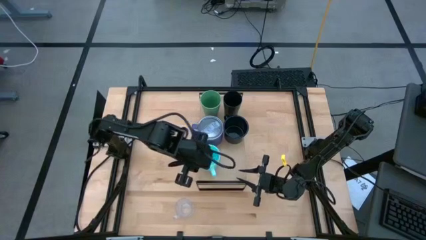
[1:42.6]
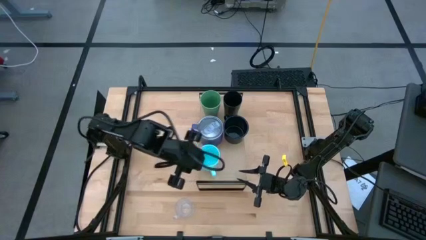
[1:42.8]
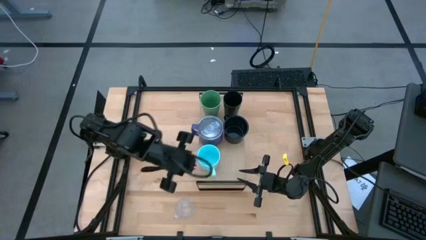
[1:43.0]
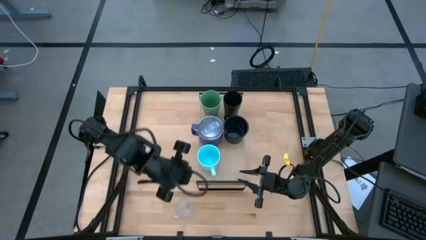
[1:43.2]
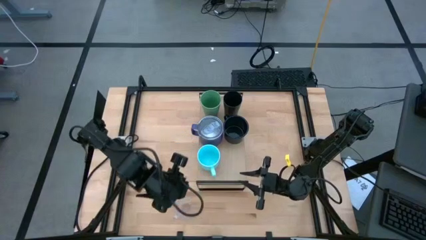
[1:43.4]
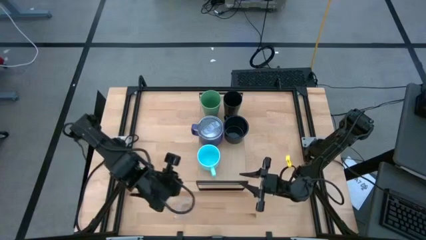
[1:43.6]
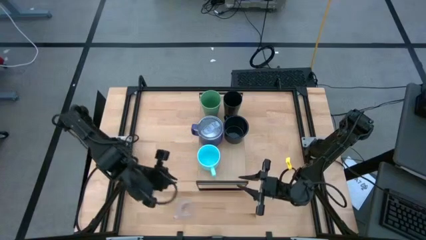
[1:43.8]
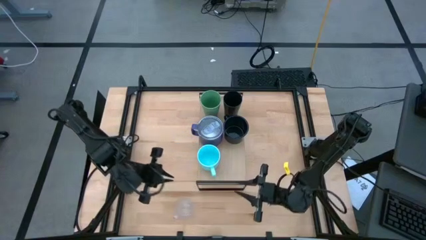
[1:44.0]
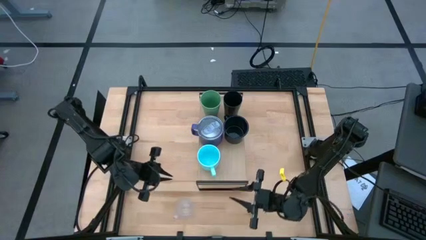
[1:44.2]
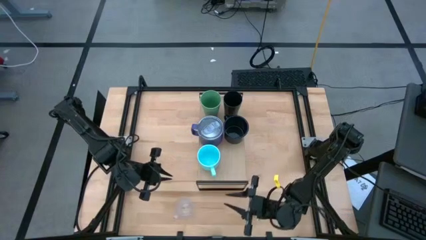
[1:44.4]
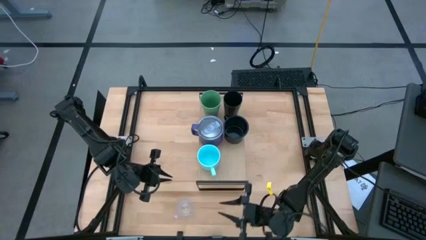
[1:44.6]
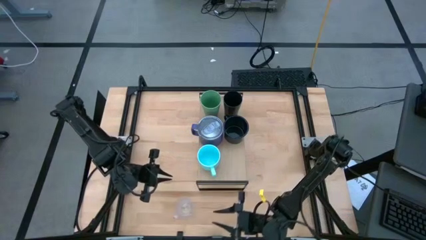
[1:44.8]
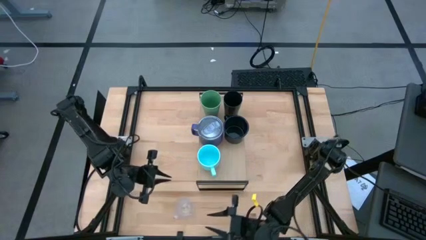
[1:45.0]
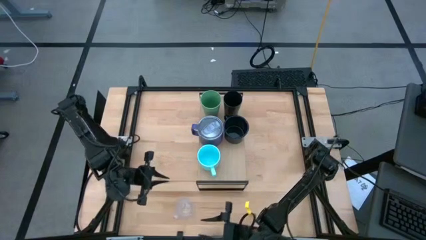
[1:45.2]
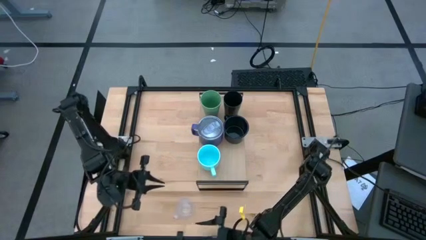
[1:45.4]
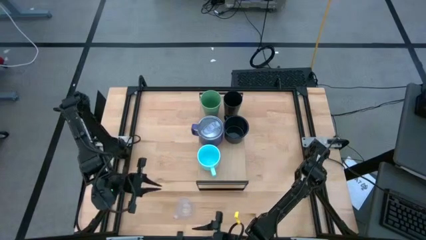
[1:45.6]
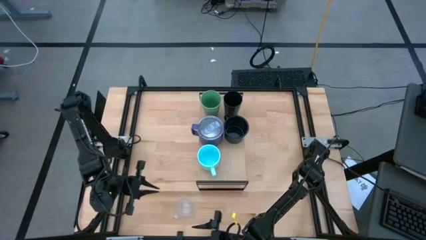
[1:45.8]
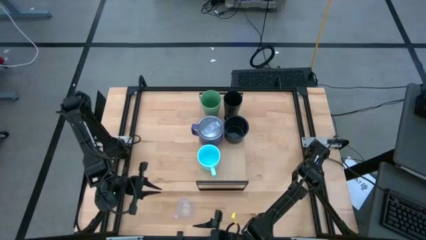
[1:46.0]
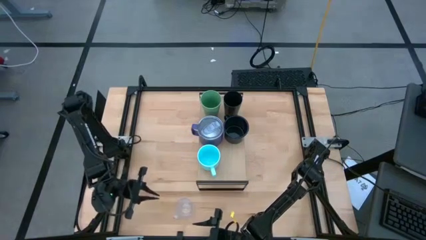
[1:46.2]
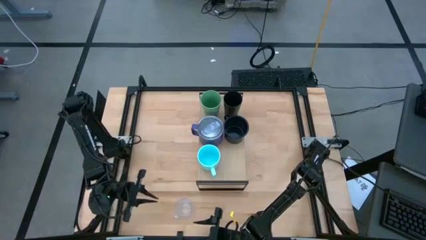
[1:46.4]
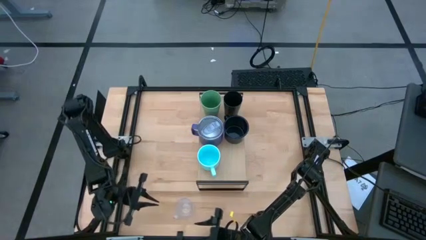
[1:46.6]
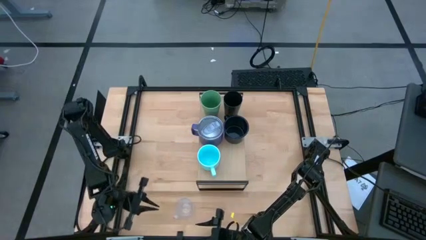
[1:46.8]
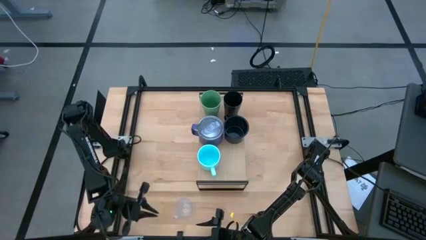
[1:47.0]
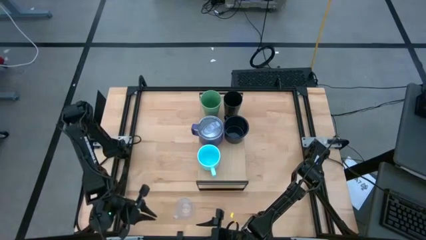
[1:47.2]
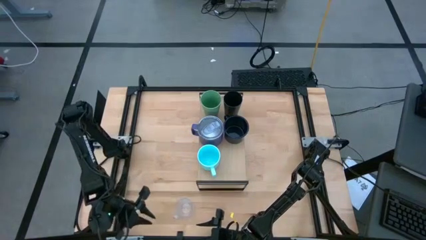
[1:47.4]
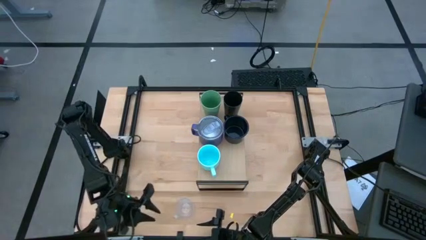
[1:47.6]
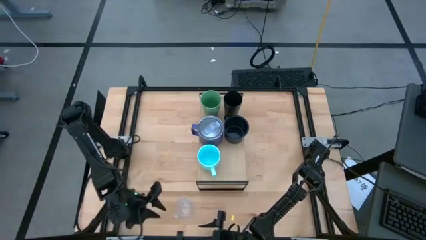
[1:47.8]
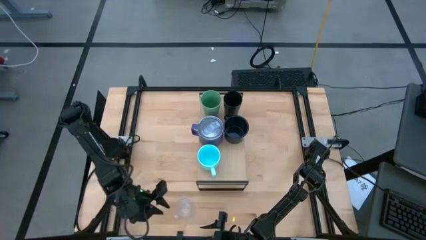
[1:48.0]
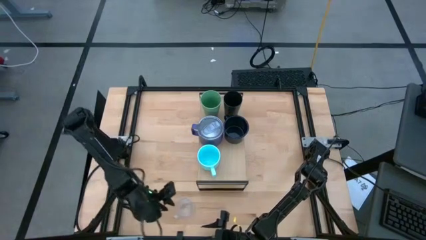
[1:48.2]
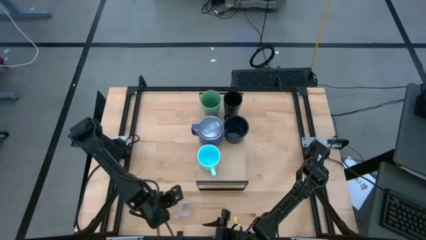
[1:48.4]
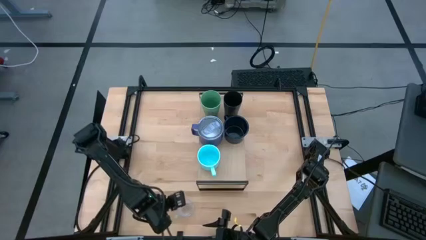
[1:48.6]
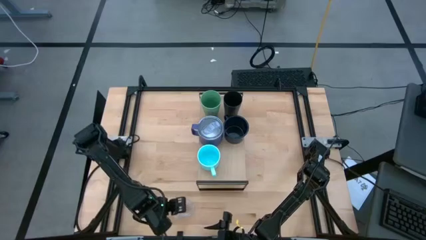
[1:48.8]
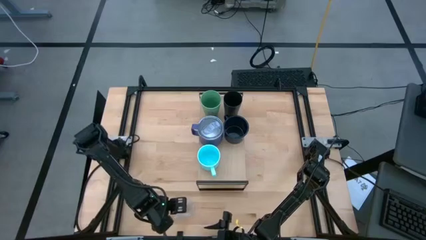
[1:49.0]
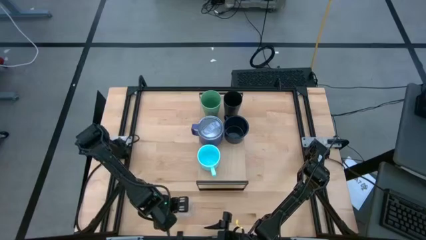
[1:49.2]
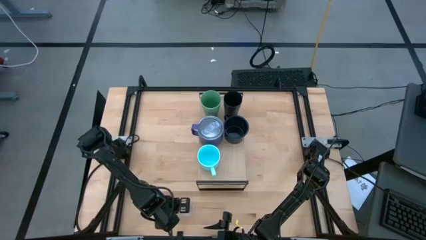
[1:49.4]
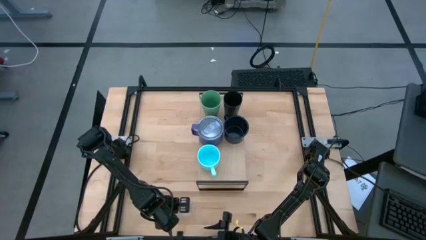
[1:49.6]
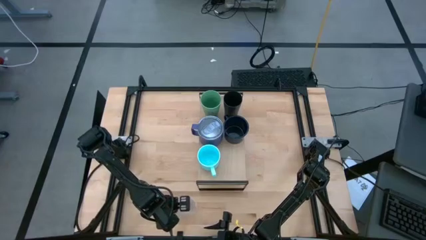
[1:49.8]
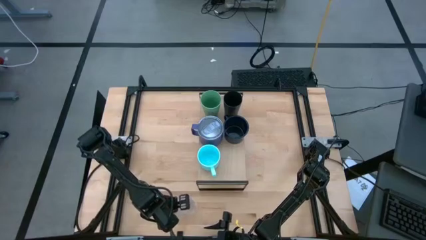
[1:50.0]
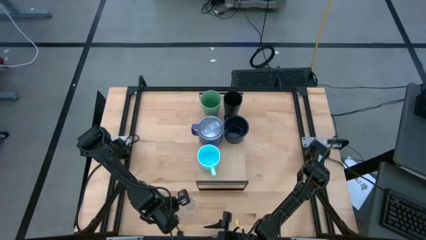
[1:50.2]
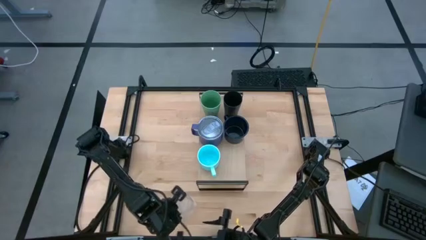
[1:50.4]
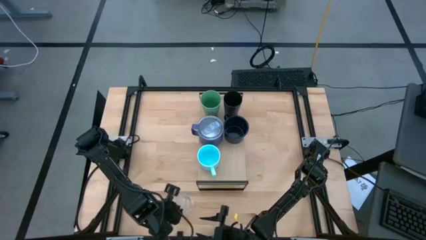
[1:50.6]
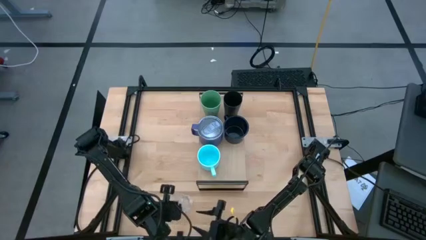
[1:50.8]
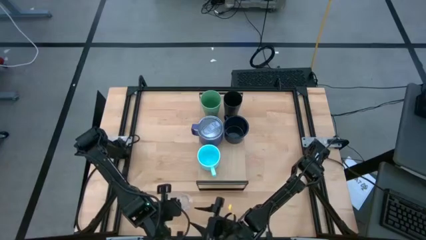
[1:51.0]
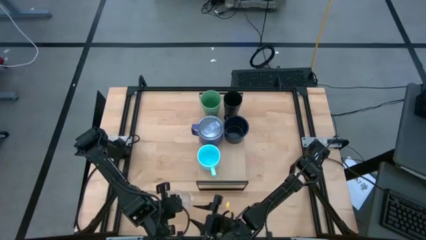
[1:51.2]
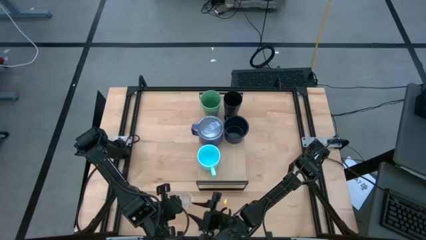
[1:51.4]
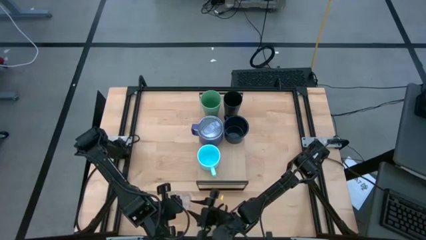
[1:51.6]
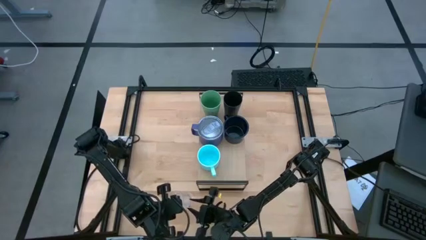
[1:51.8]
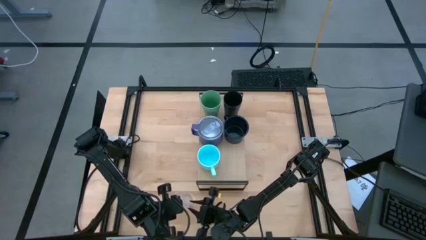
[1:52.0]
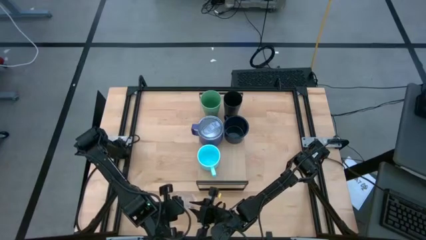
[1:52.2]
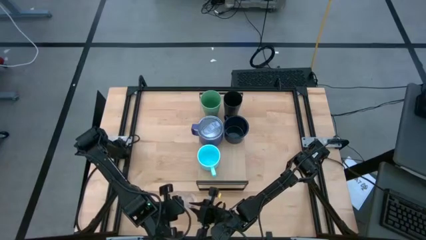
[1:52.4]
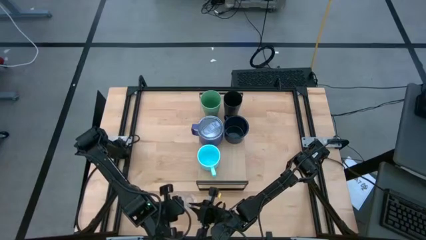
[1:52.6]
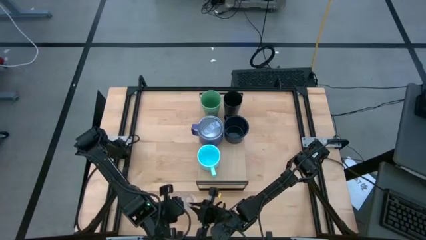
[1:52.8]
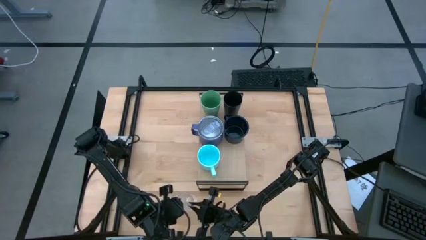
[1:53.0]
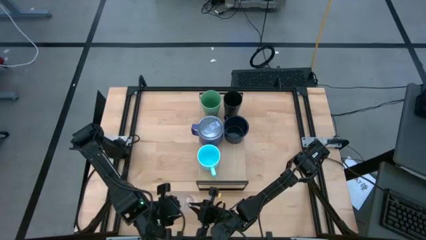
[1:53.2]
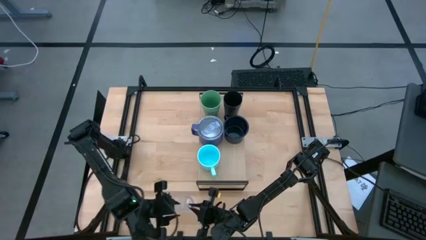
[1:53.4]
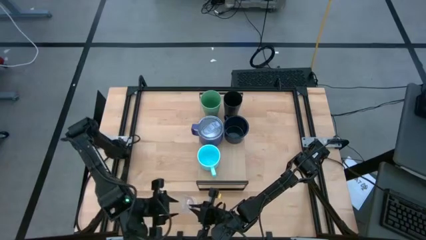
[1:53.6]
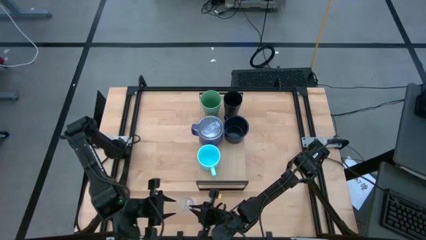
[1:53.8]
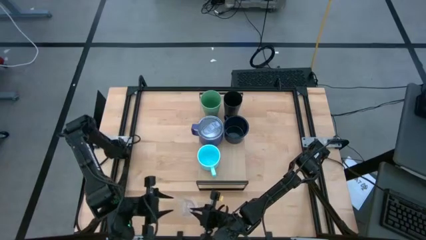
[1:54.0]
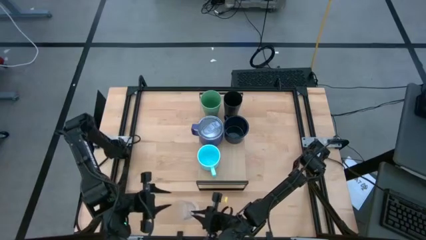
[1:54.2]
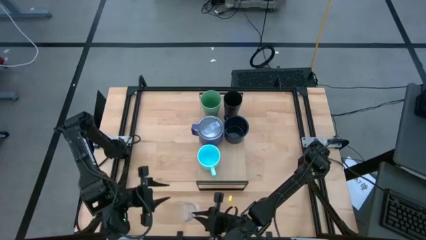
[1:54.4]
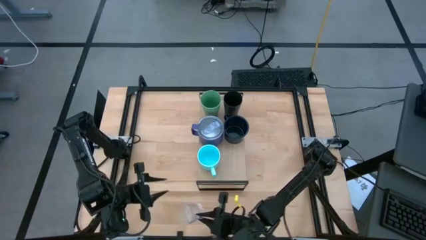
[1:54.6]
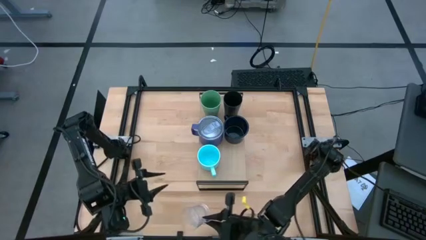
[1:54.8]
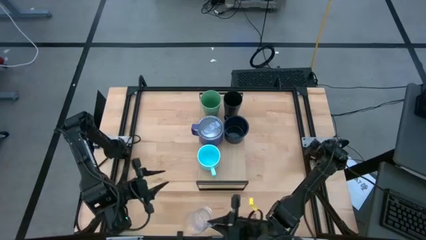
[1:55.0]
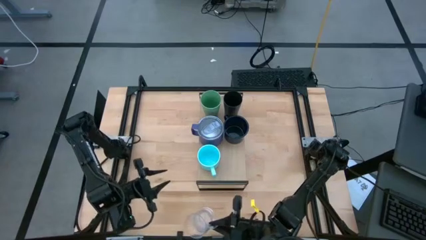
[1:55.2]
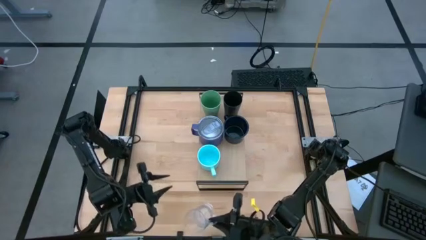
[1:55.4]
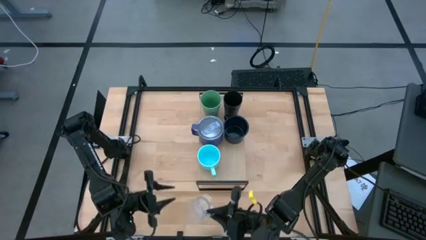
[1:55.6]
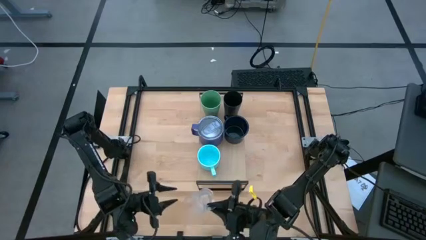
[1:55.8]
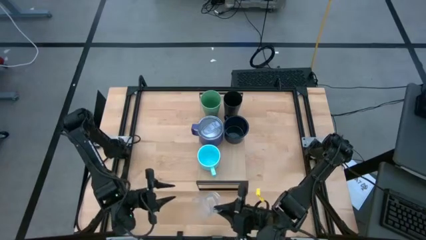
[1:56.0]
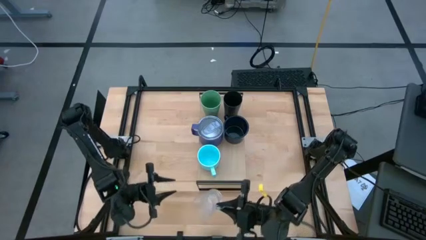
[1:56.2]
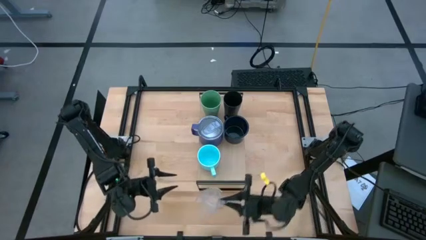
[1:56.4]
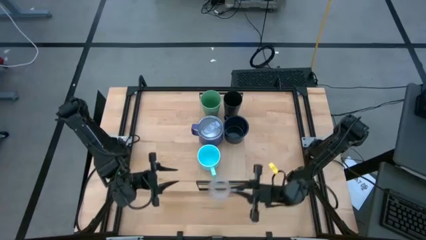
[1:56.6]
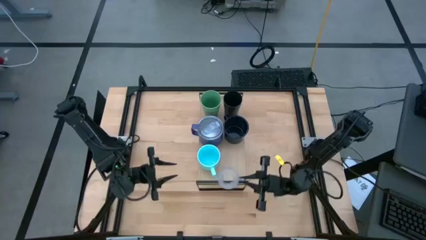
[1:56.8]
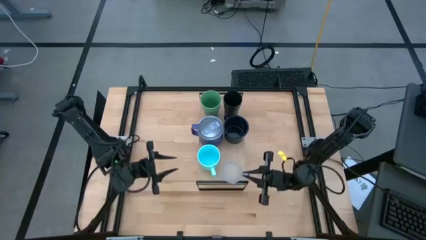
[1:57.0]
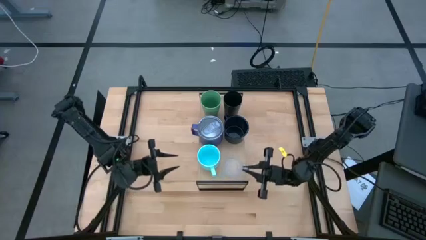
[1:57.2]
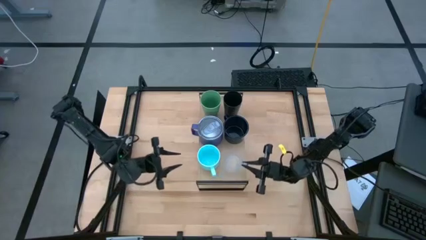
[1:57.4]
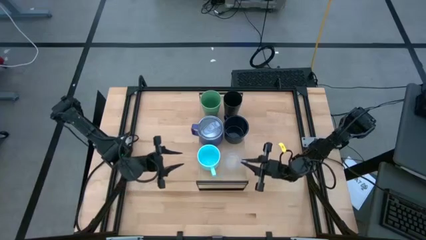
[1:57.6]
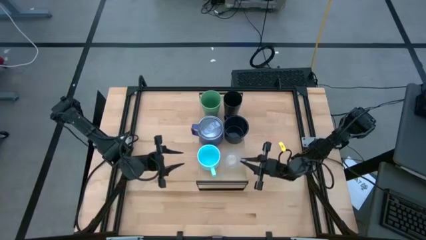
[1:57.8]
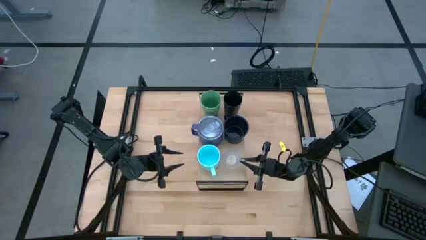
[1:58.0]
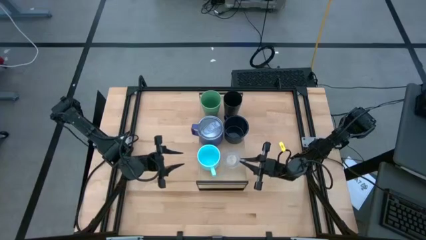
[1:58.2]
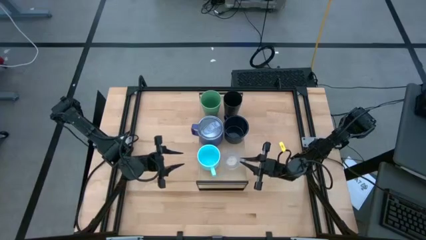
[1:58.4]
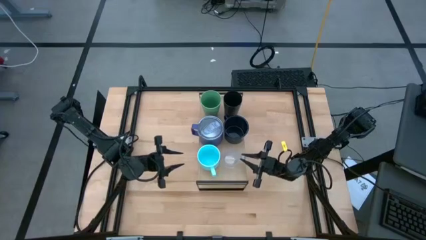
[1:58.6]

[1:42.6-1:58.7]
Task: Stack small to large cups/mugs on shelf
Put the transparent mug on the shelf

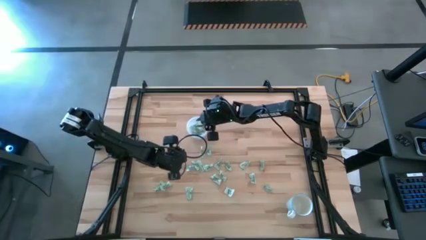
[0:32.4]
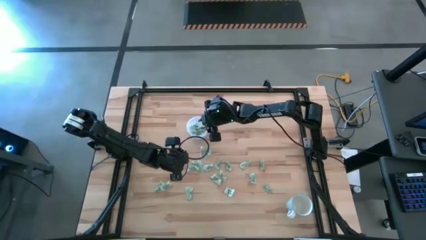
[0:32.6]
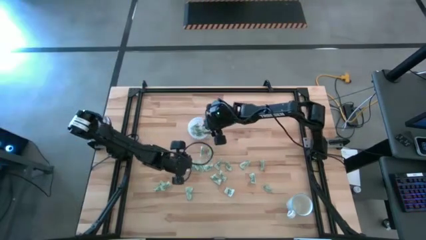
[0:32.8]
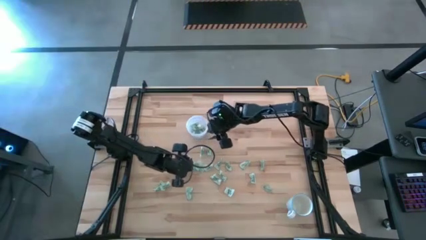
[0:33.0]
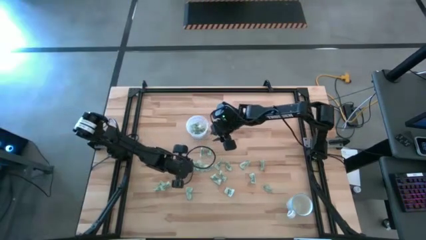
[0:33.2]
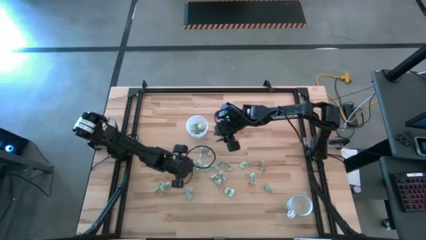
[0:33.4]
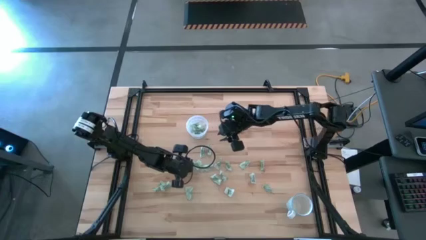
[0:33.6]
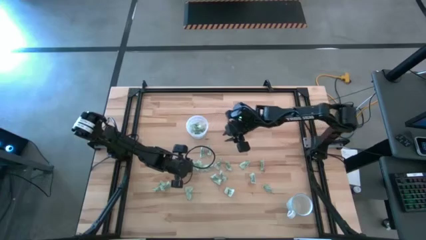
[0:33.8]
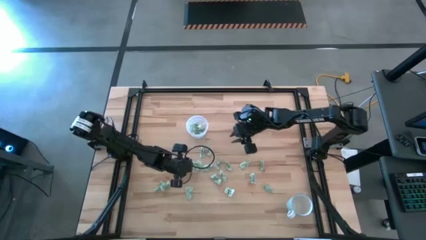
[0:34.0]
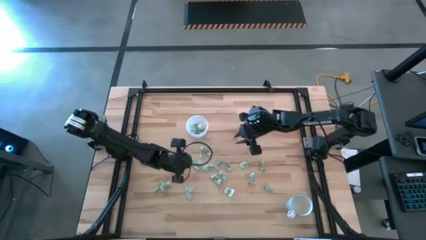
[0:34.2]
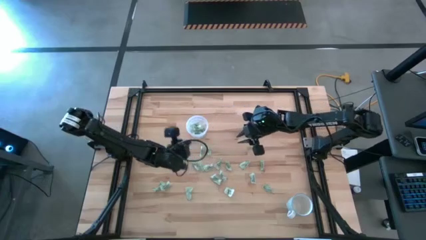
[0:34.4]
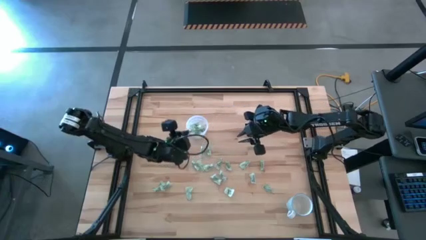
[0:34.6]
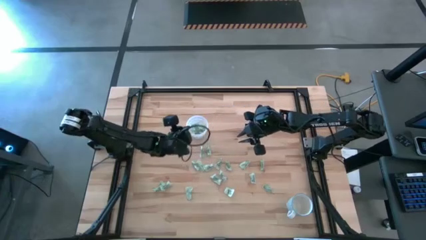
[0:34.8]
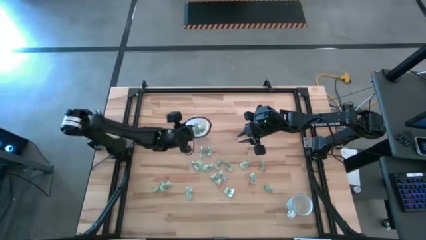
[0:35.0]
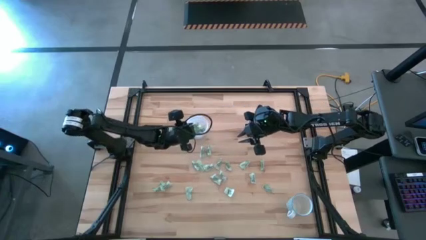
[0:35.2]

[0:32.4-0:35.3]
Task: Pick and place Stevia / Truvia into bins
Put the stevia packet into the transparent container
